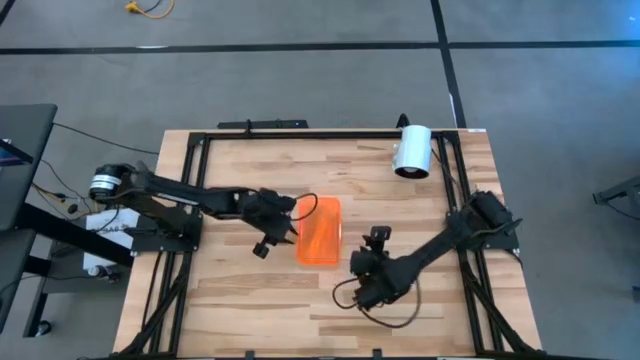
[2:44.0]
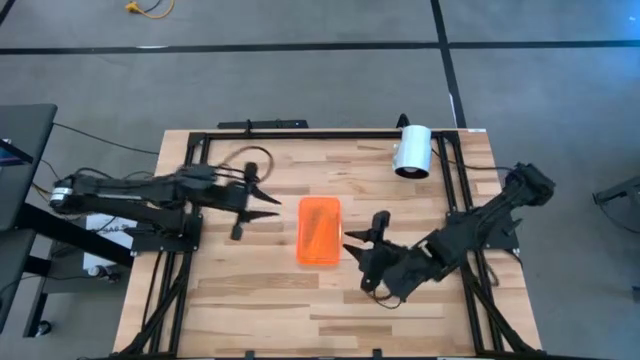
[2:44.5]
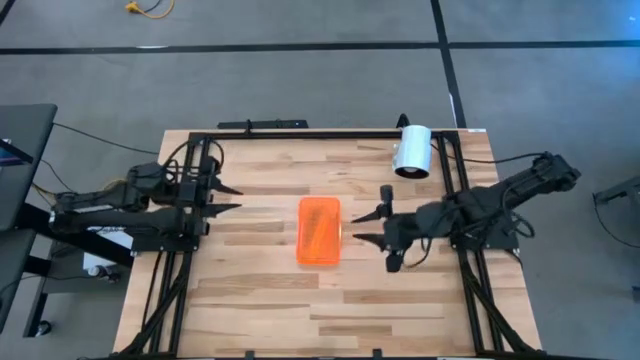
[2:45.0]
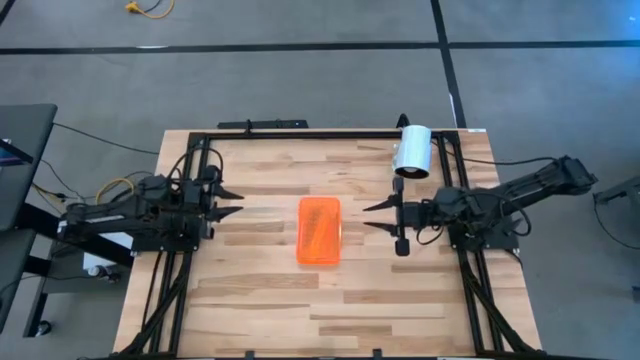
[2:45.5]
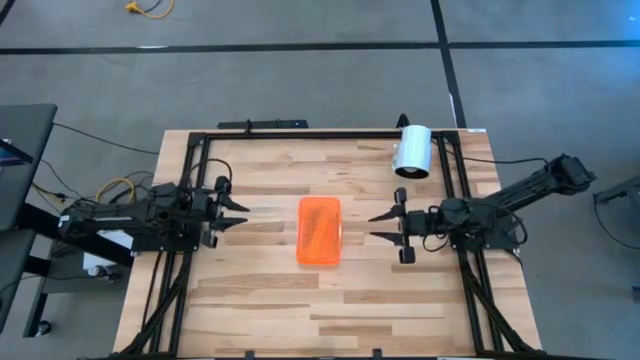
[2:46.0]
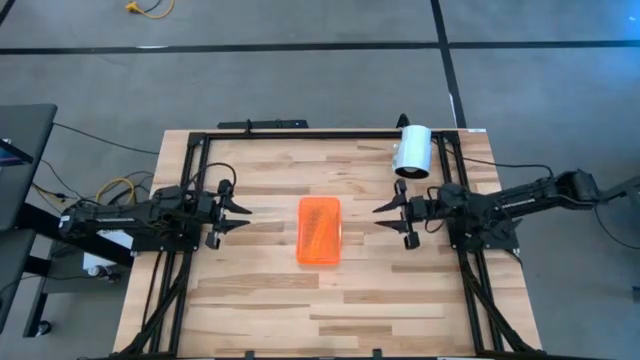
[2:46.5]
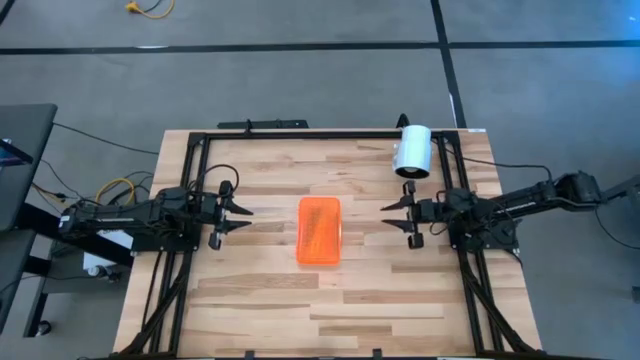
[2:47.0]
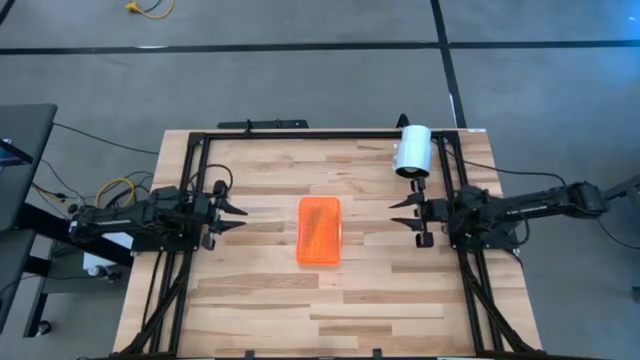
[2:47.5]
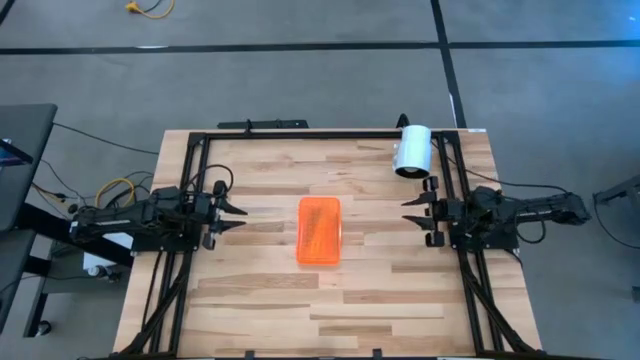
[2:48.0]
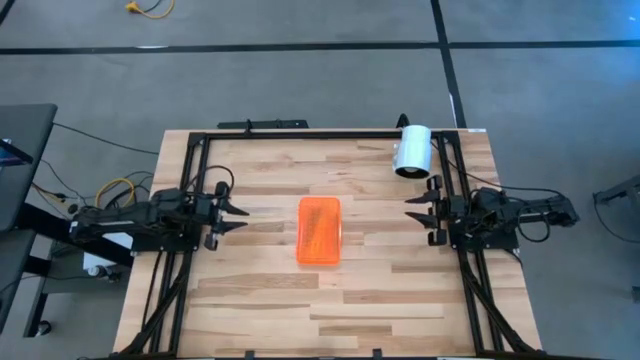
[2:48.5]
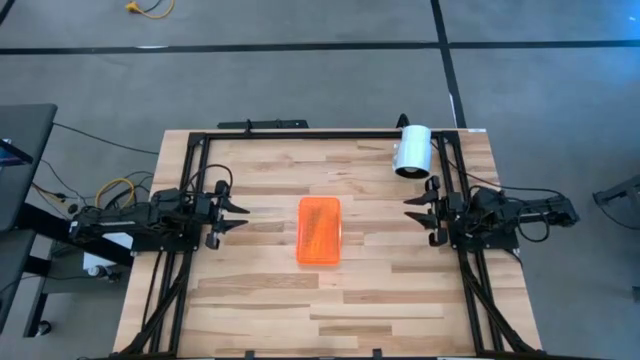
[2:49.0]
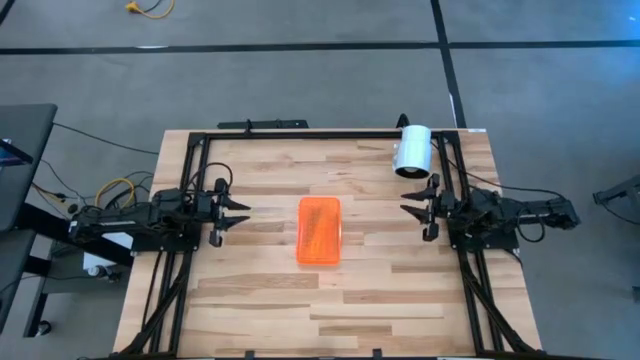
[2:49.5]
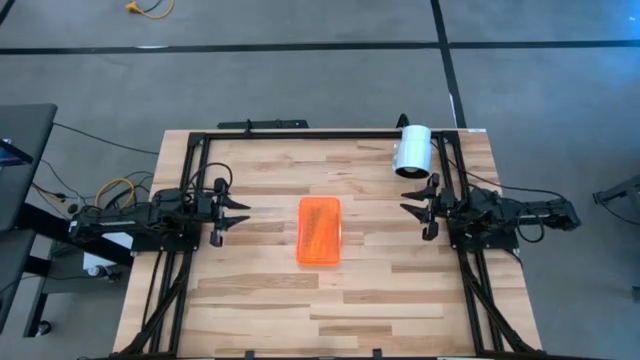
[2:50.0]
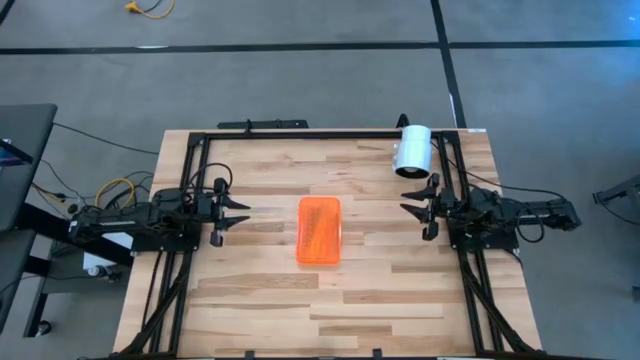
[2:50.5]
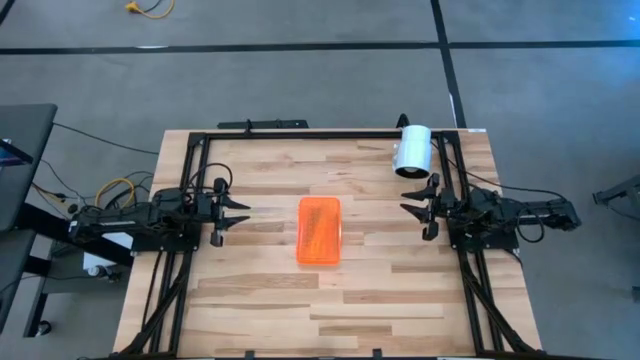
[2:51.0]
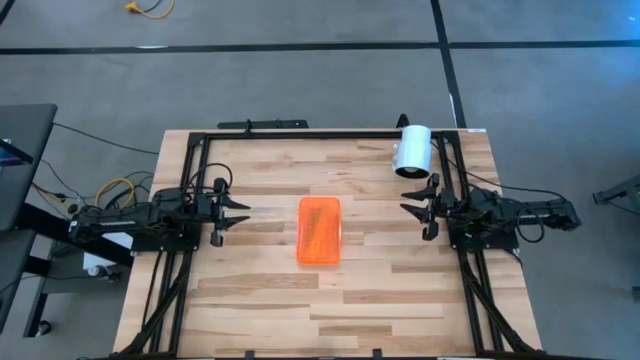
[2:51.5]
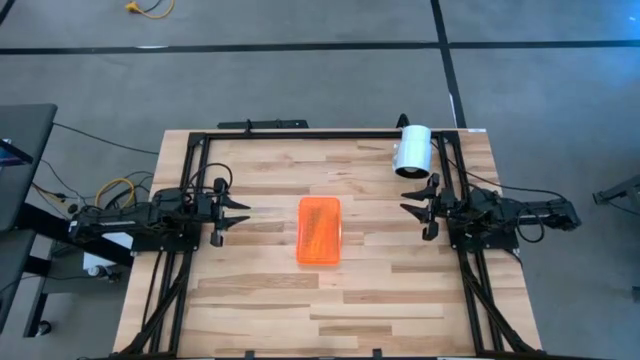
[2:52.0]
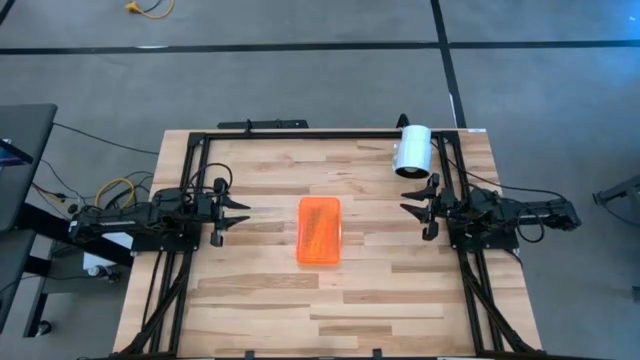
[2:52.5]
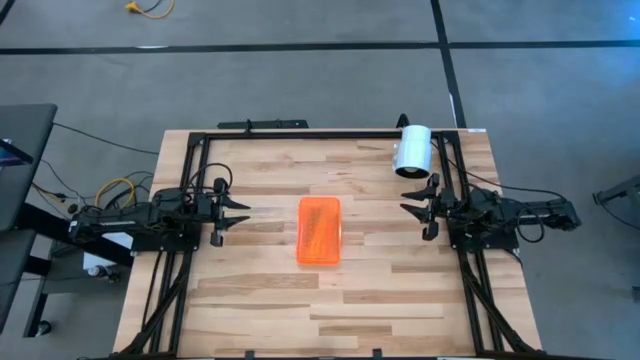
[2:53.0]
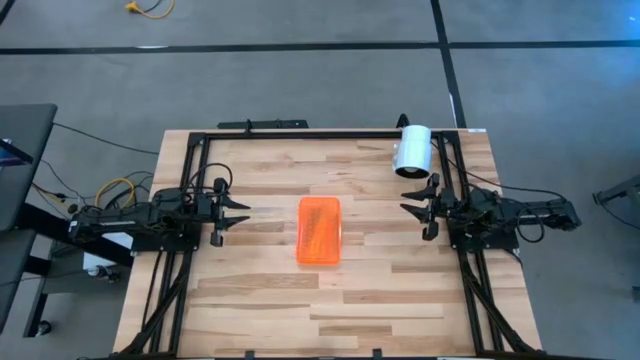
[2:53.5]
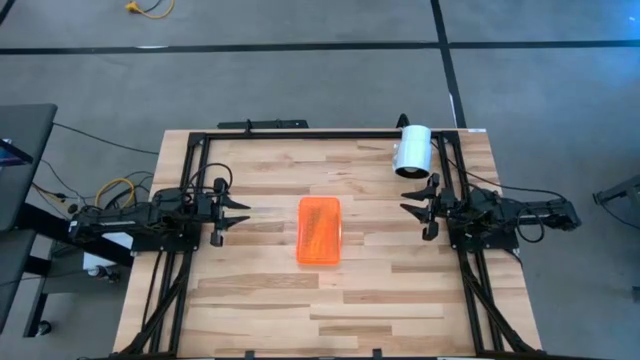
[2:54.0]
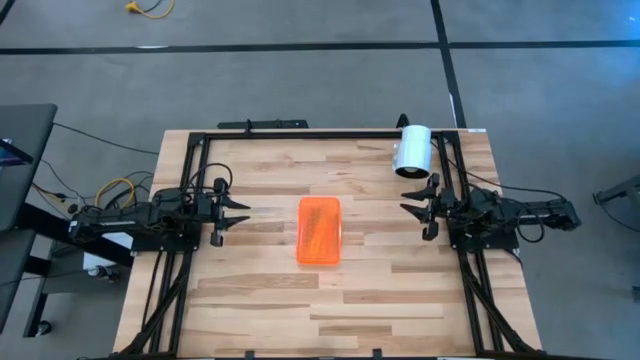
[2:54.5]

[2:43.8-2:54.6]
Task: Pick & place school supplies into a supply box
Return to Home Position

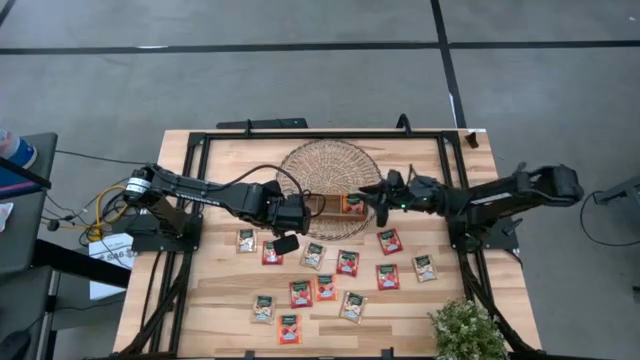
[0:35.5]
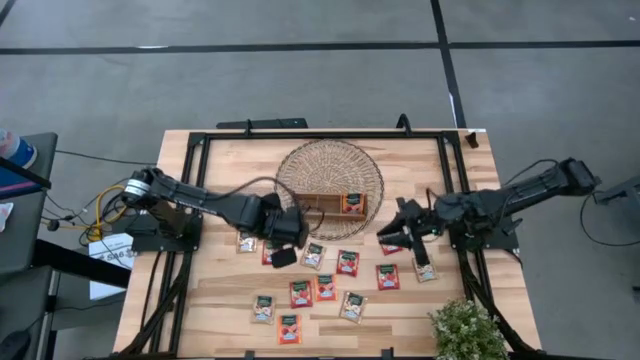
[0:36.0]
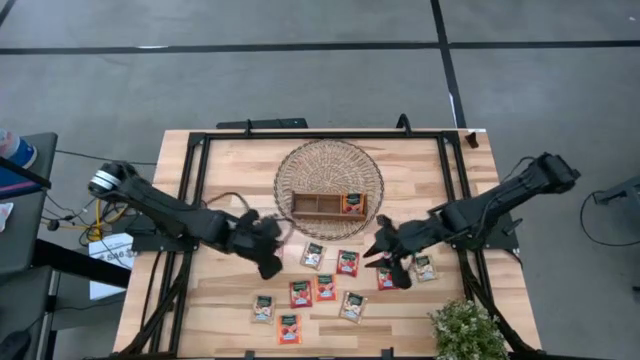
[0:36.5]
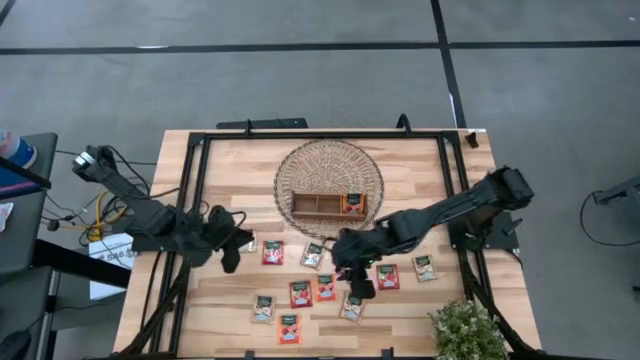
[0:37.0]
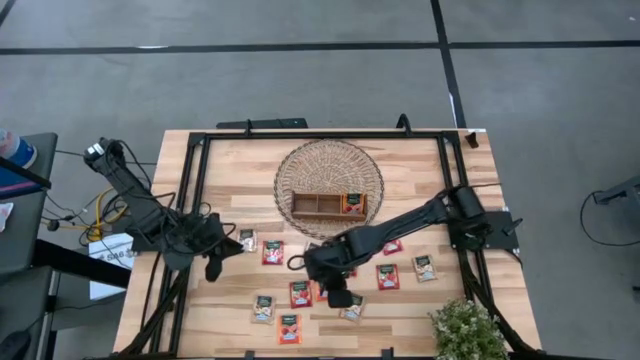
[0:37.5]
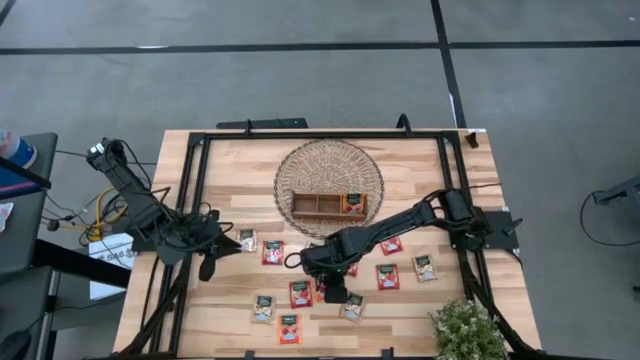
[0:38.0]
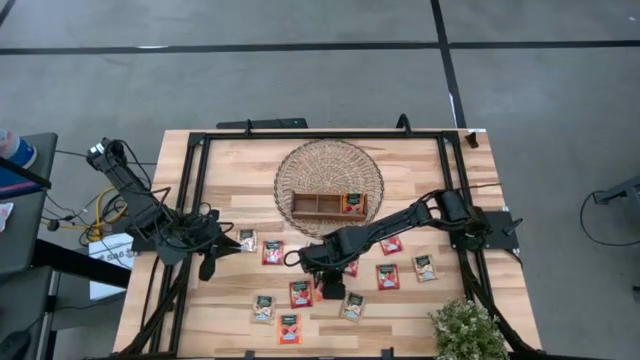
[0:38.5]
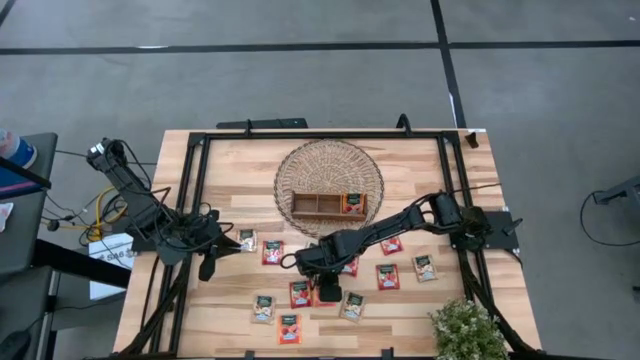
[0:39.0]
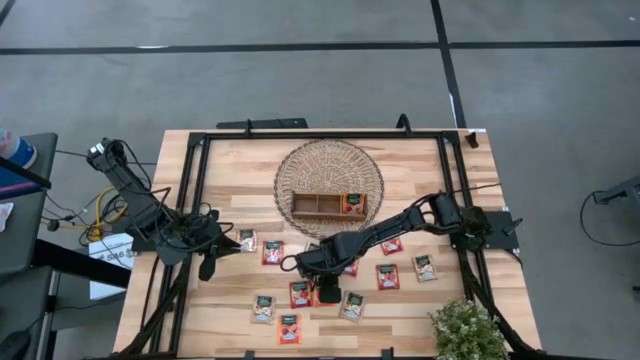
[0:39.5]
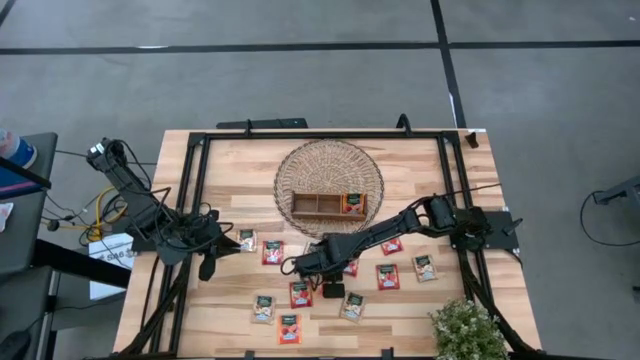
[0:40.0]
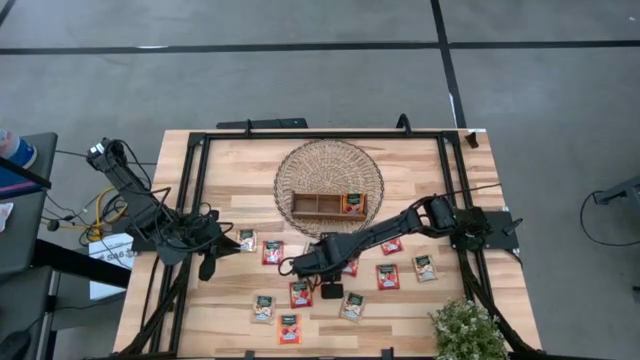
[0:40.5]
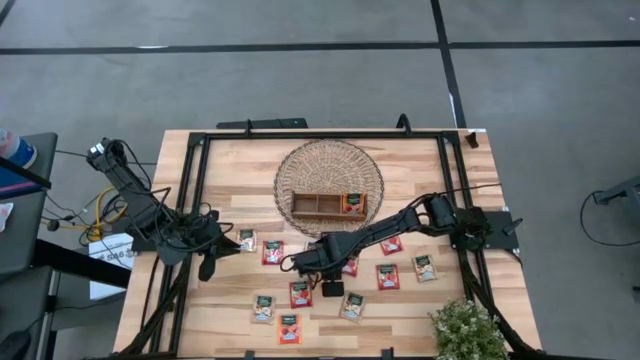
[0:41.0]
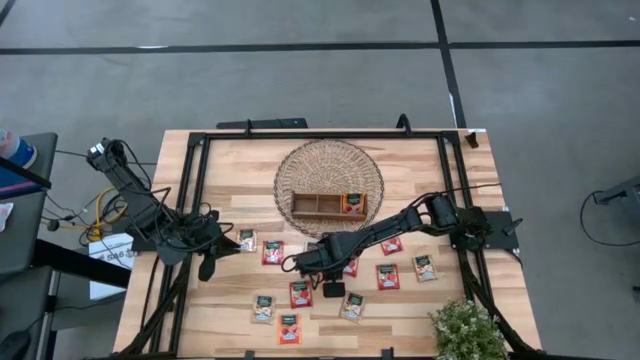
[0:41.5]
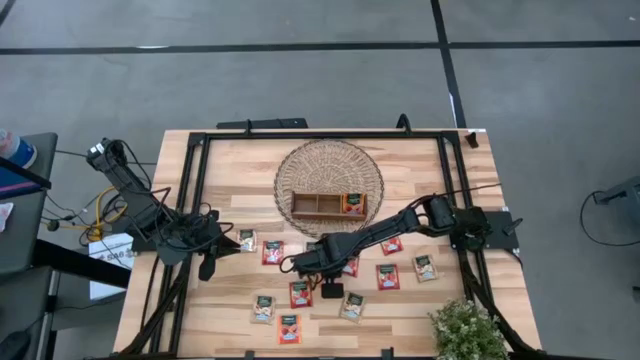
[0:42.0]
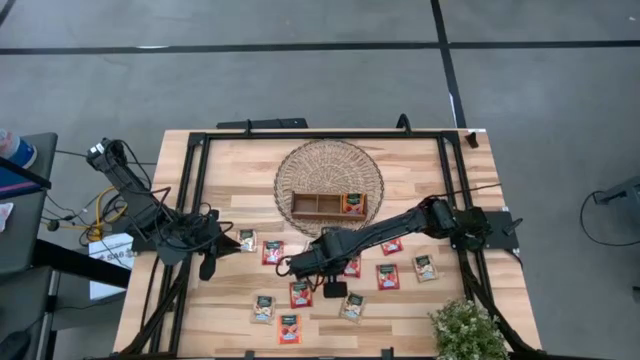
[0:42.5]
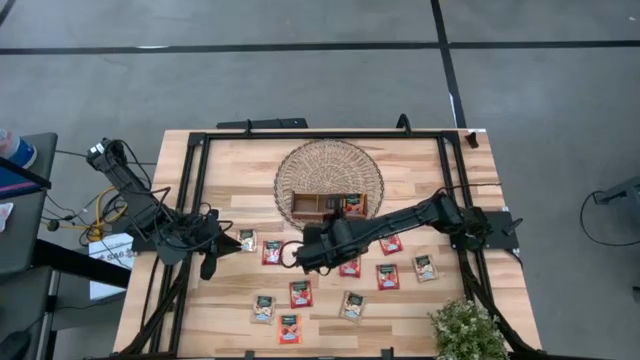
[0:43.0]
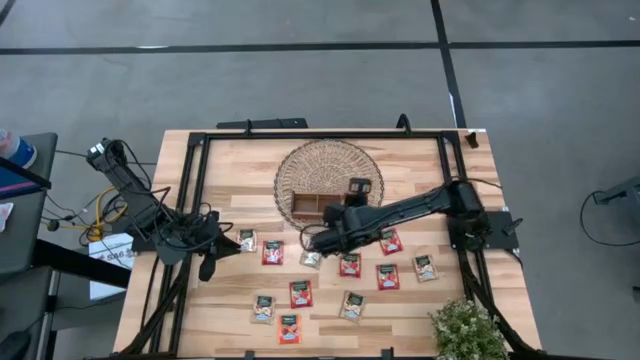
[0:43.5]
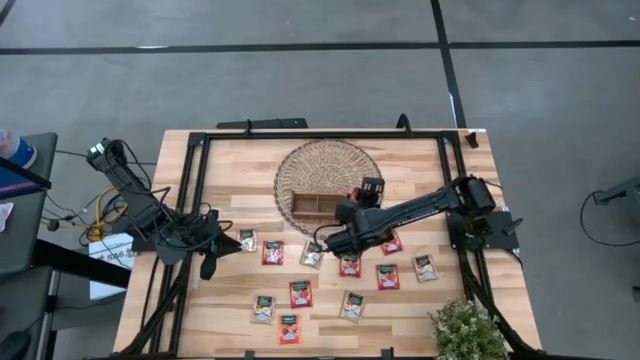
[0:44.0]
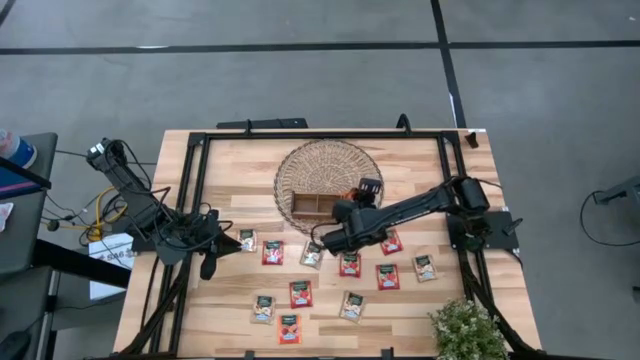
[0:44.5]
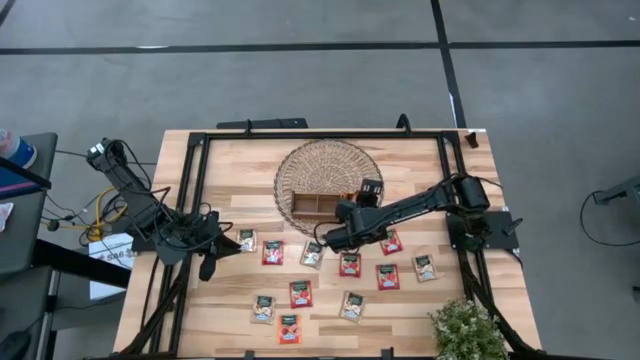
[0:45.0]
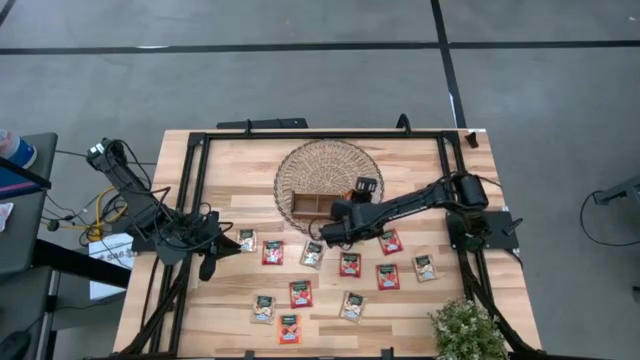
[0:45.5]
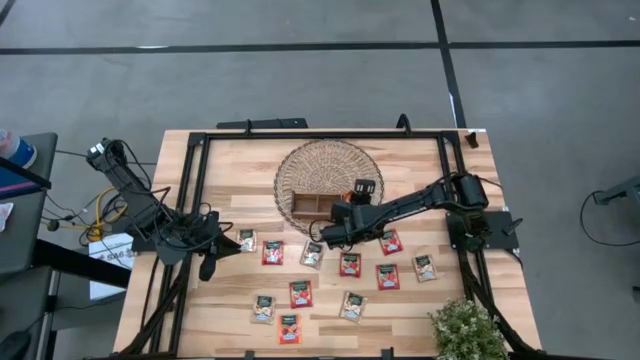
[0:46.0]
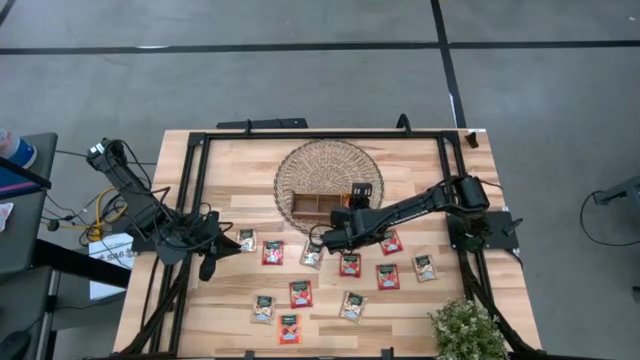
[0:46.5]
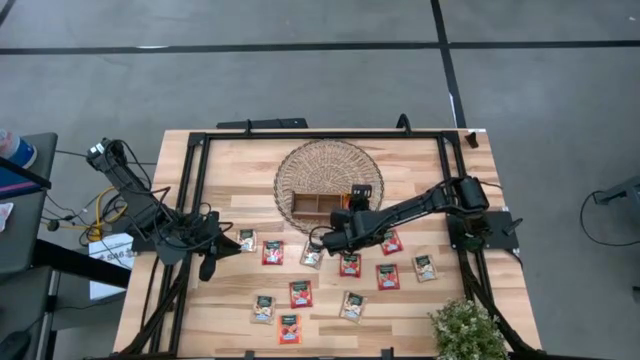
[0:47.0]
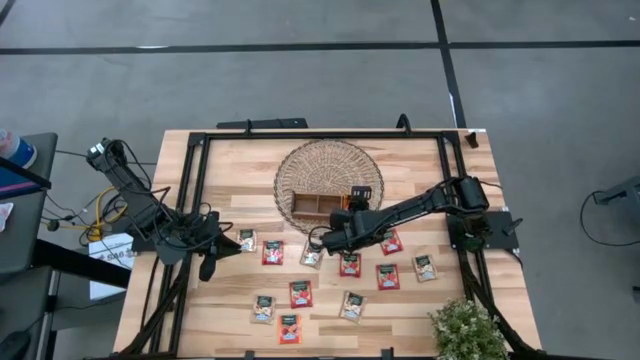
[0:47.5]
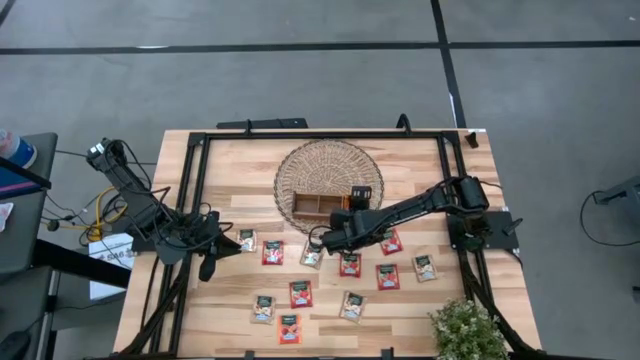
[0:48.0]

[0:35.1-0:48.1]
Task: Pick & Place Tea
Put the orange tea bag into the right section of the wooden organizer
